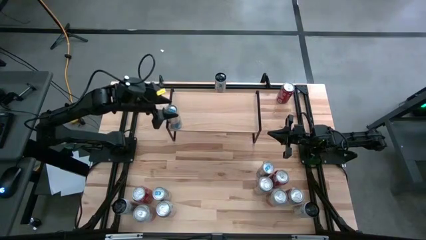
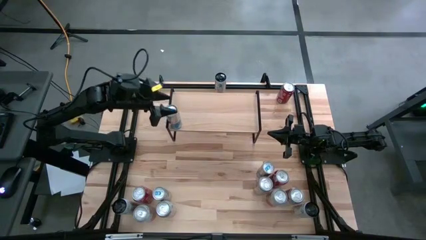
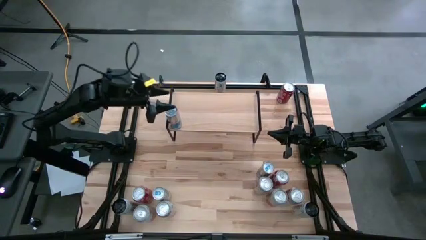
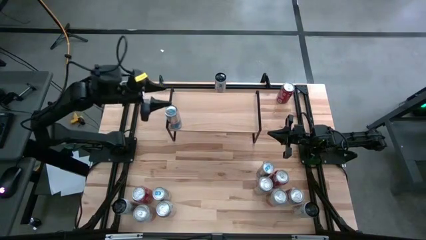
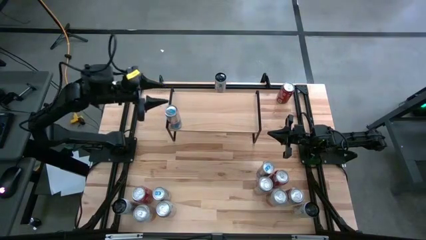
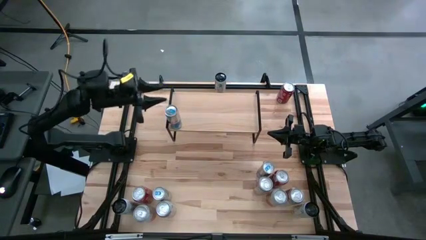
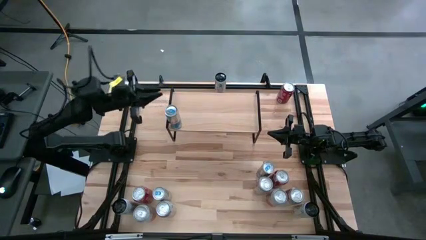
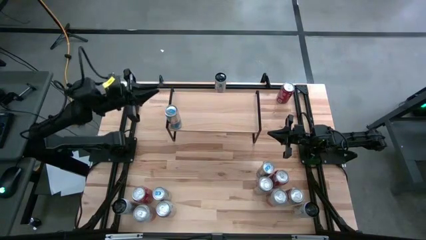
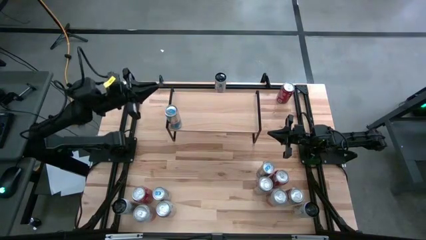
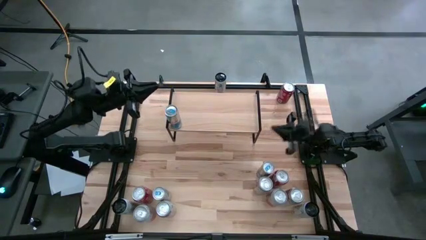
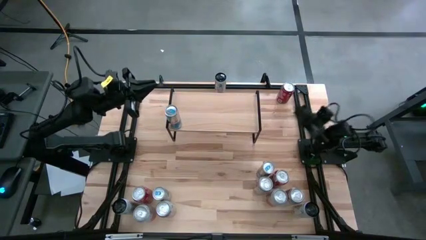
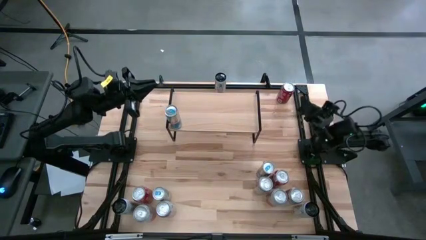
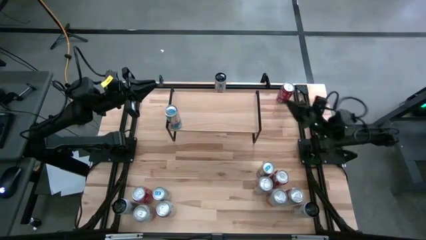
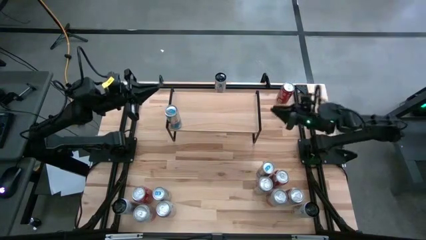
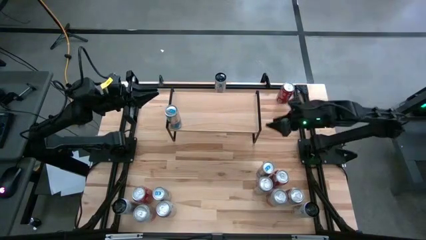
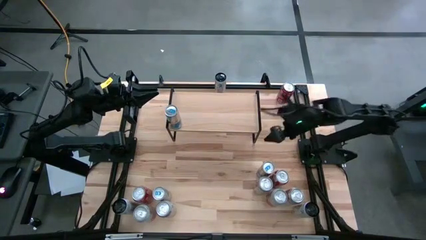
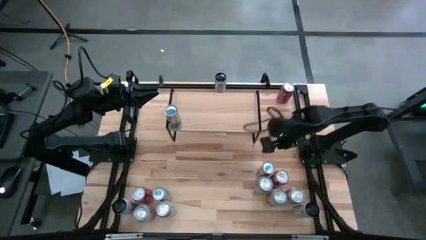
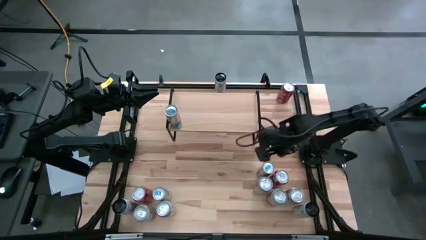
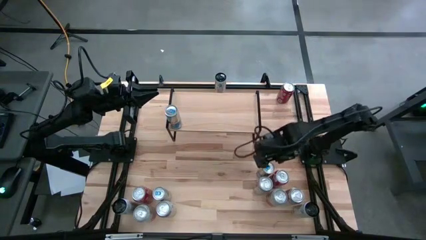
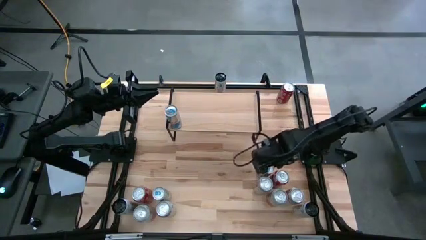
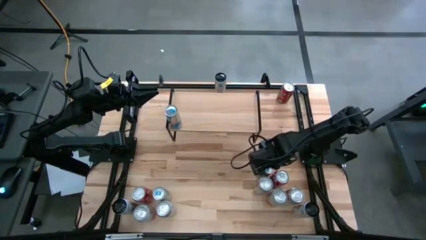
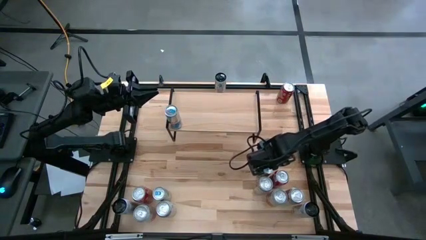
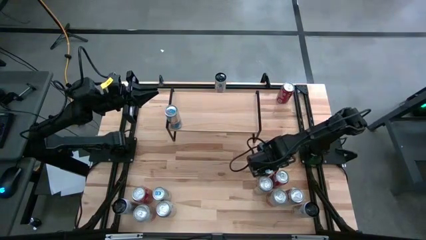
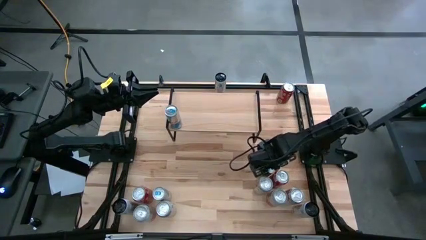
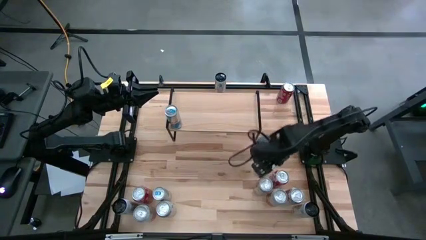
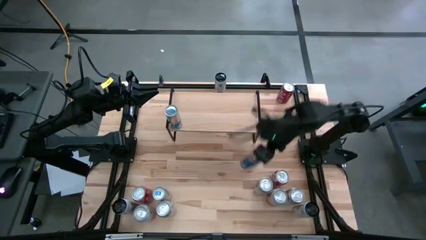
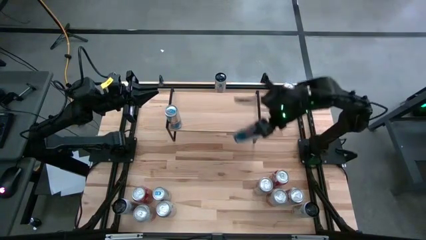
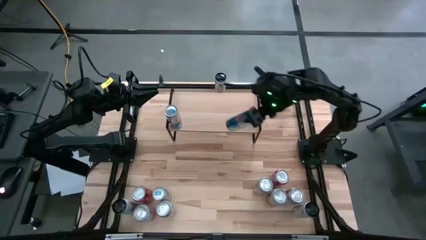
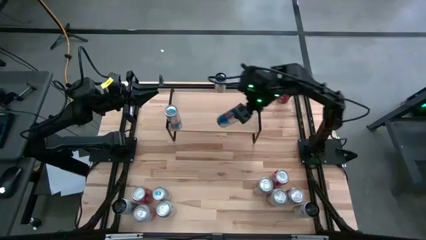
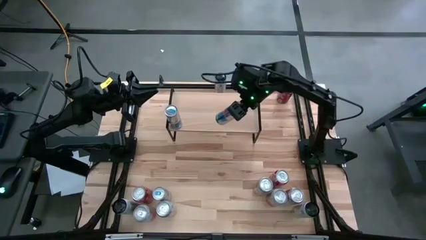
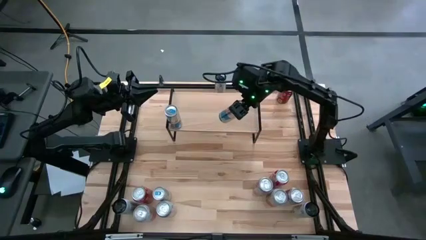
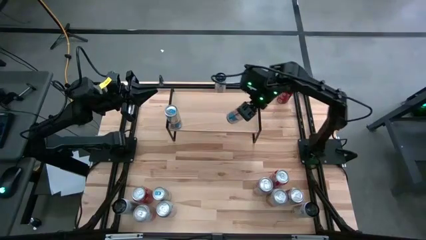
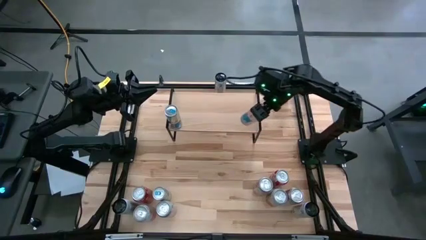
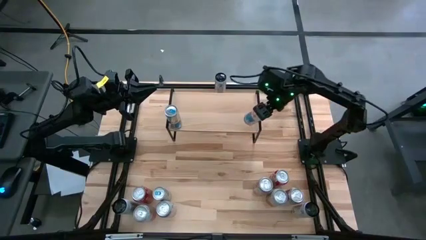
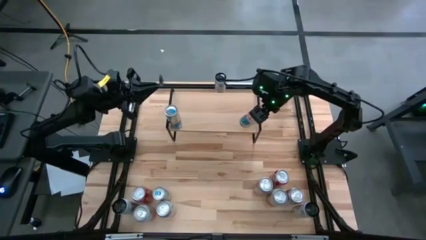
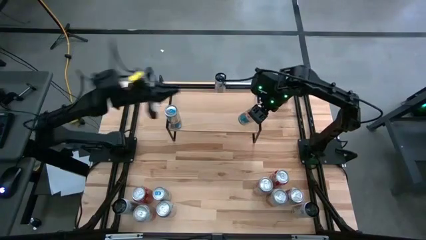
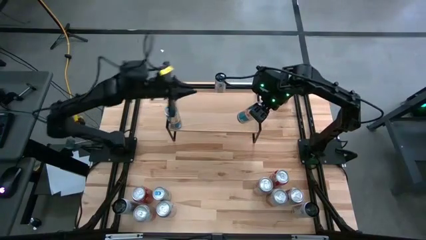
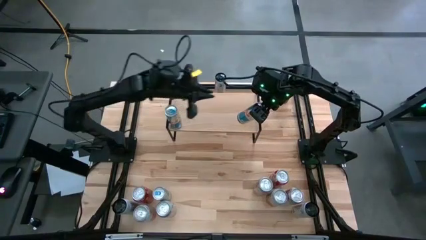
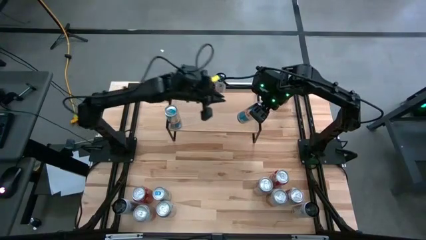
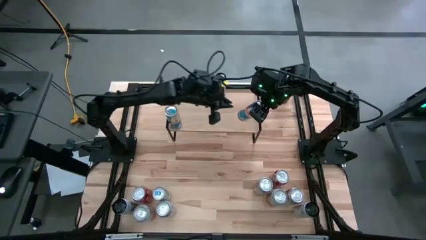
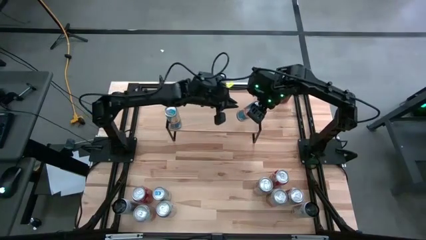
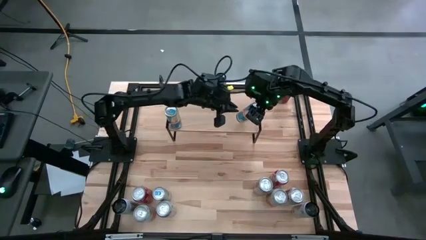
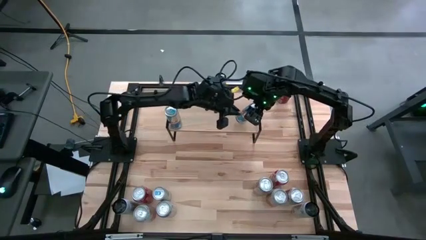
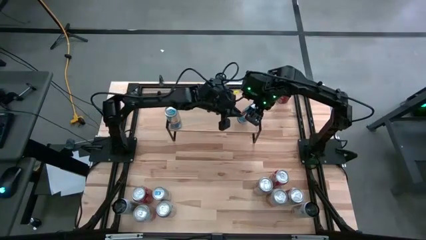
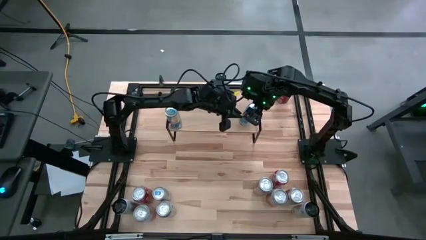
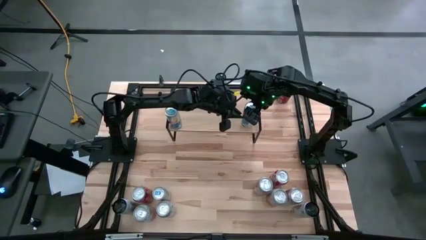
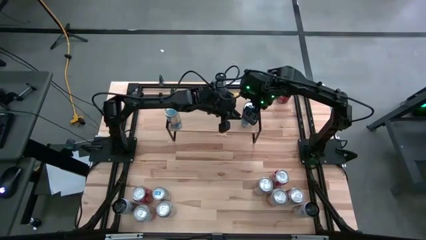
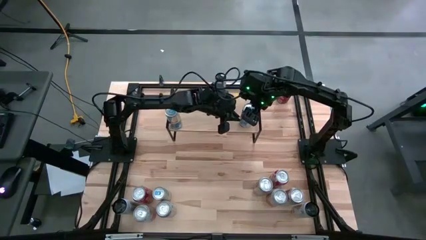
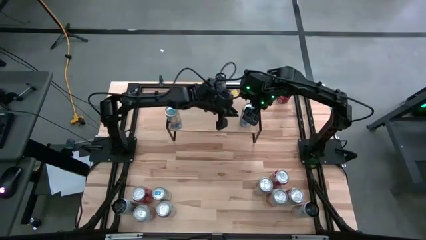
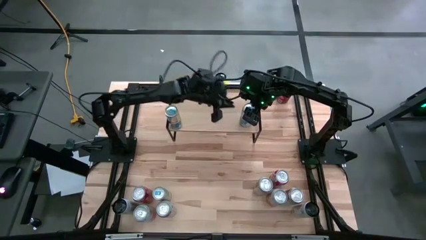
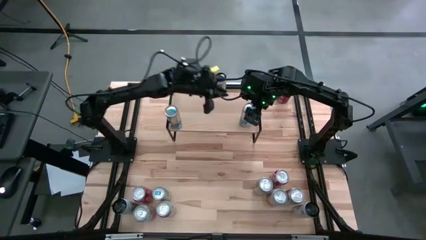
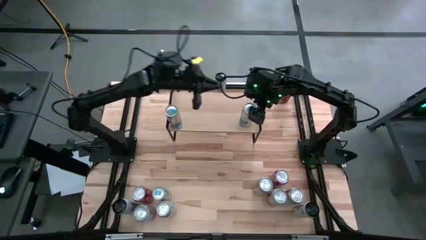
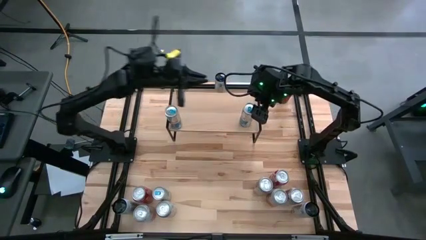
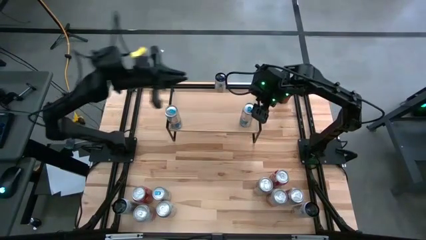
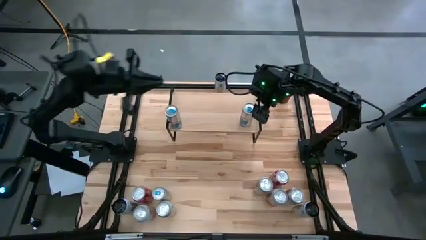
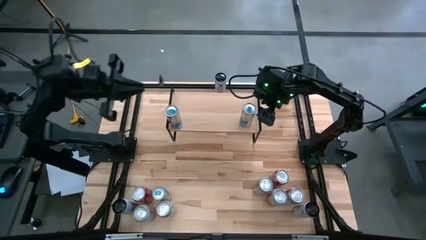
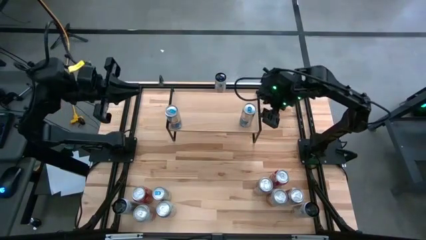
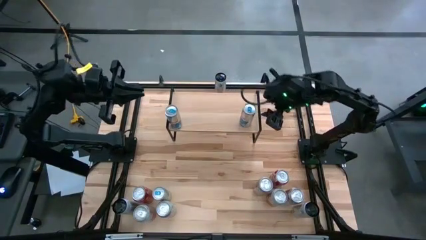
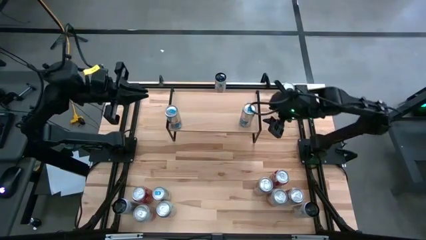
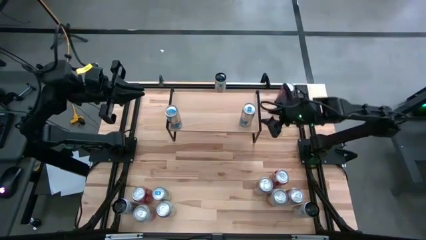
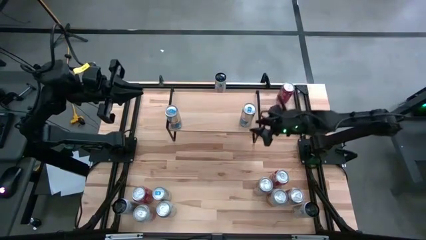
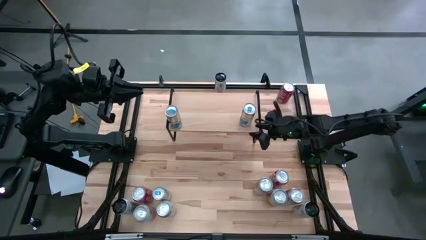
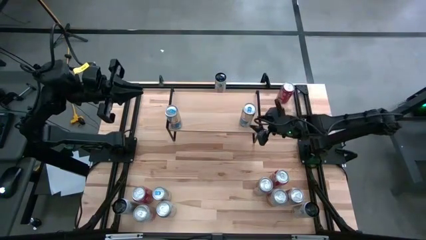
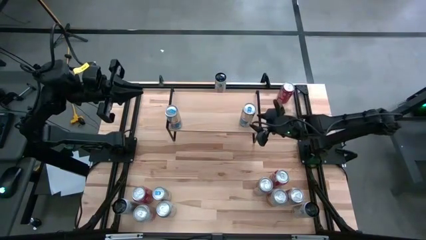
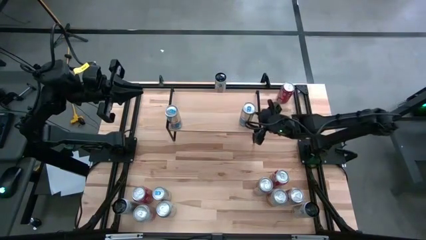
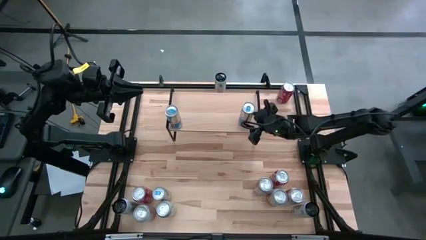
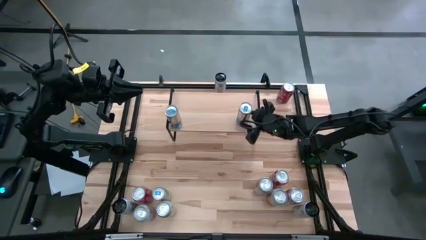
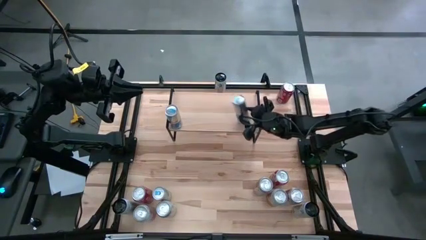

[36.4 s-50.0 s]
Task: Place canned beverage on shelf
Put the right blue soda can aligned with the other blue soda can on the shelf
